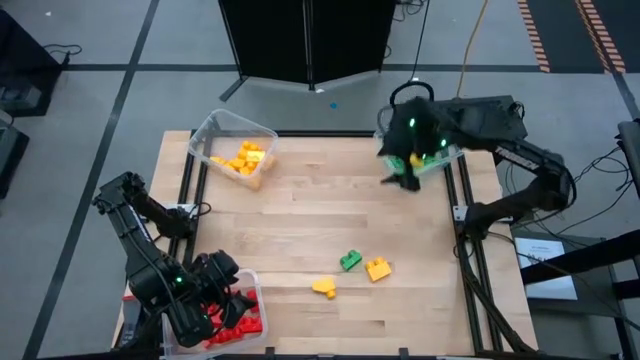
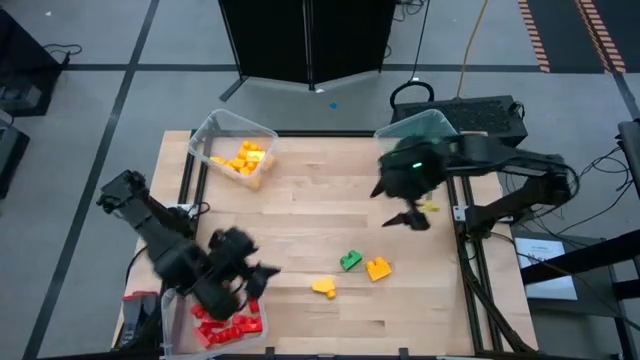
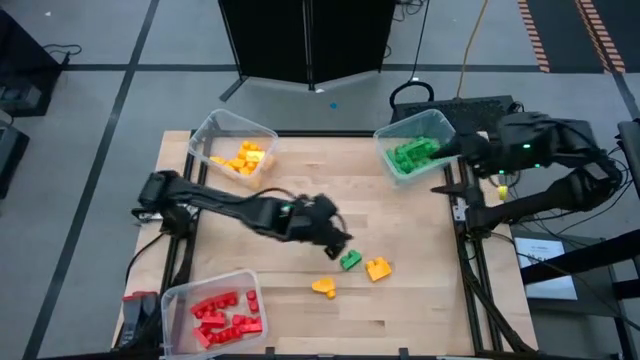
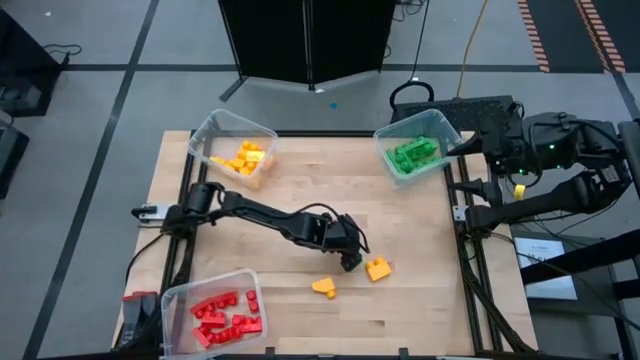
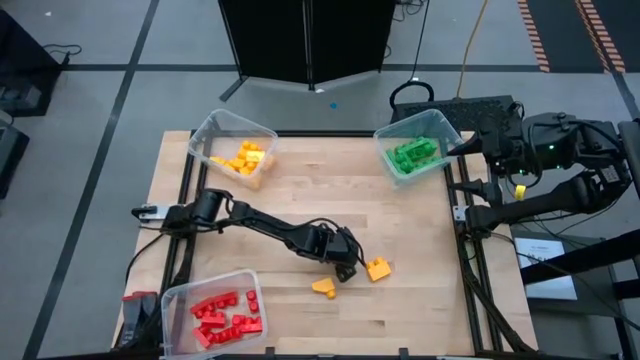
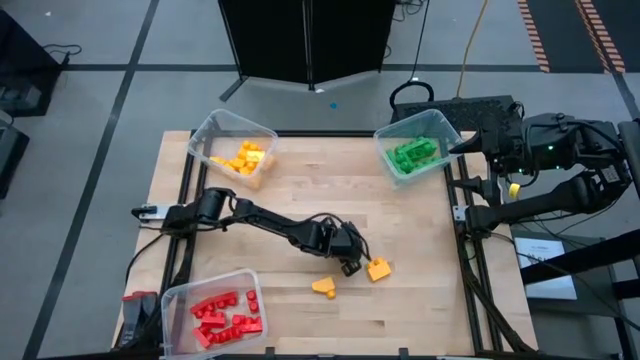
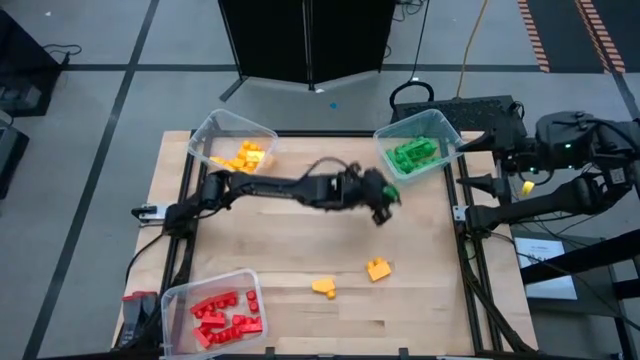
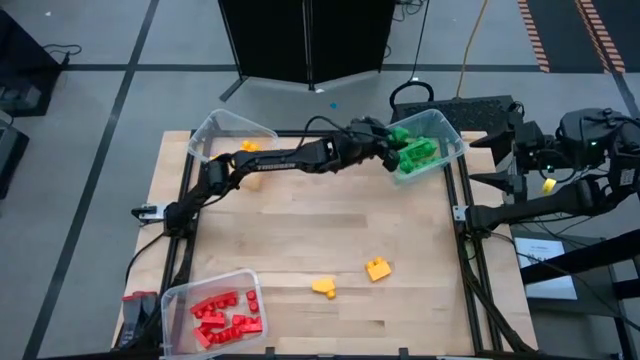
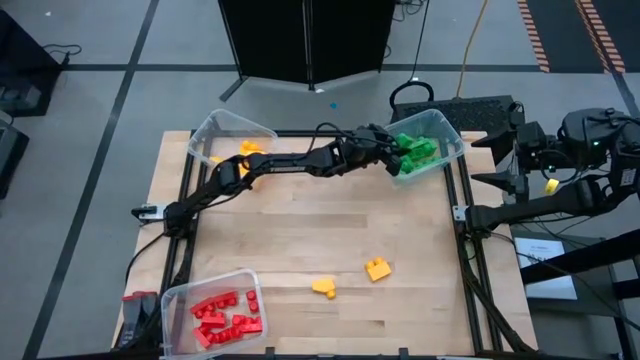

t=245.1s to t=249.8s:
Task: Sort blocks
Put the green game piece into the top right transparent bin

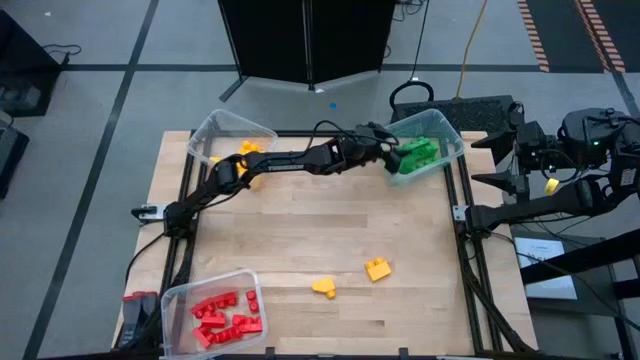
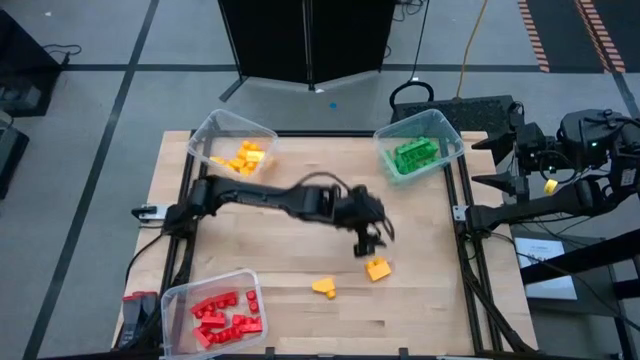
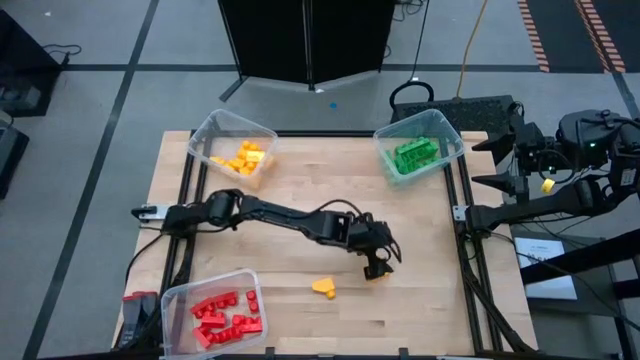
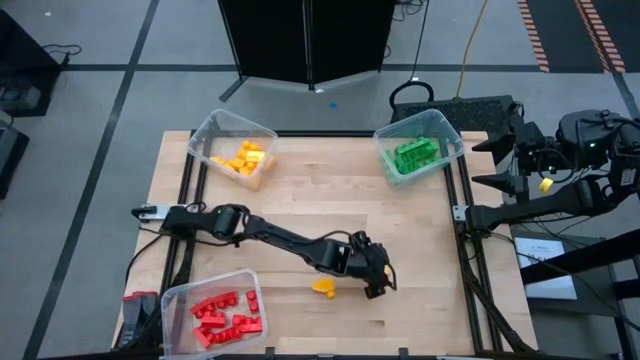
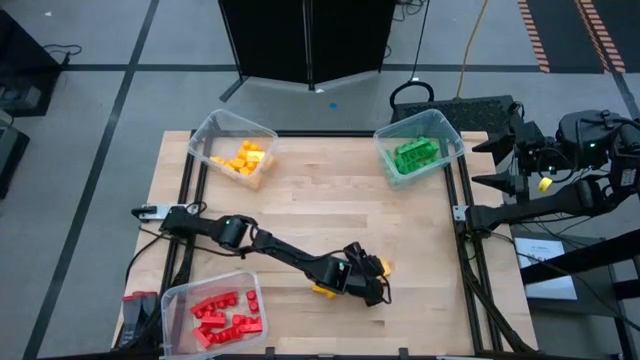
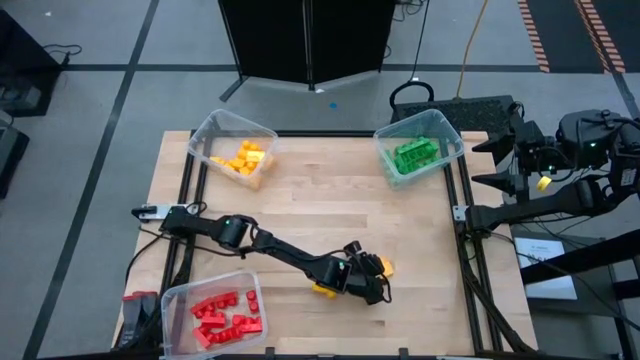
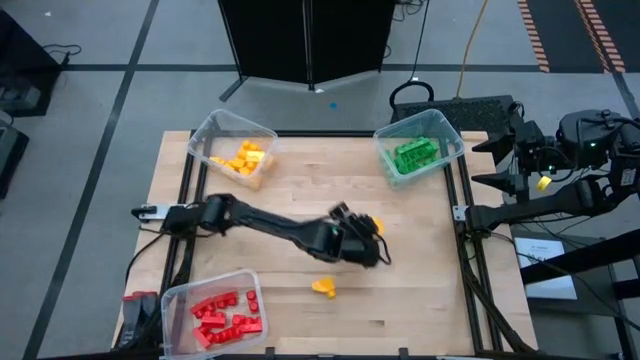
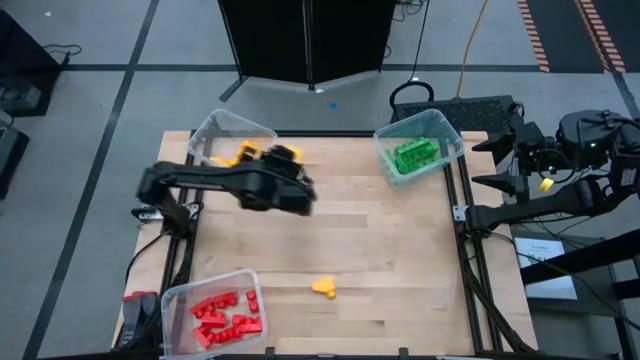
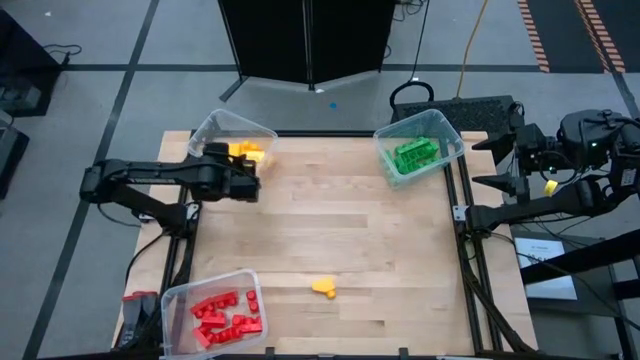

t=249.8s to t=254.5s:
Put the yellow game piece into the top left transparent bin

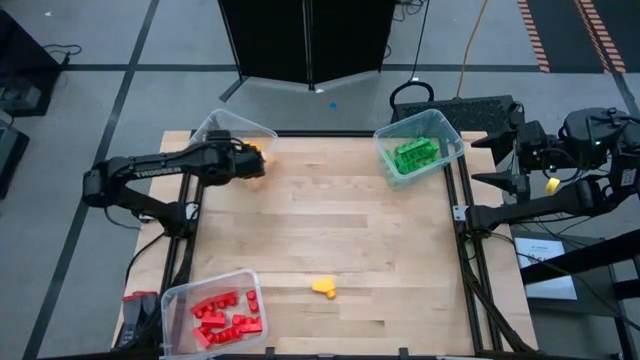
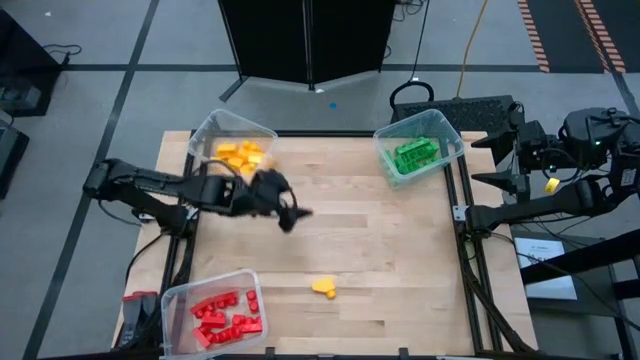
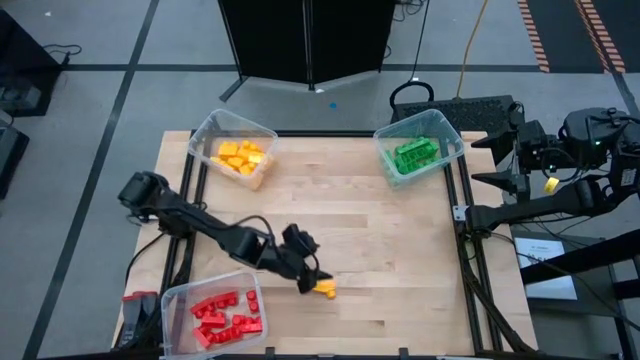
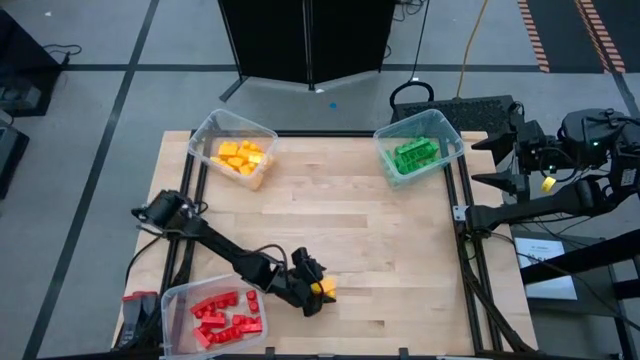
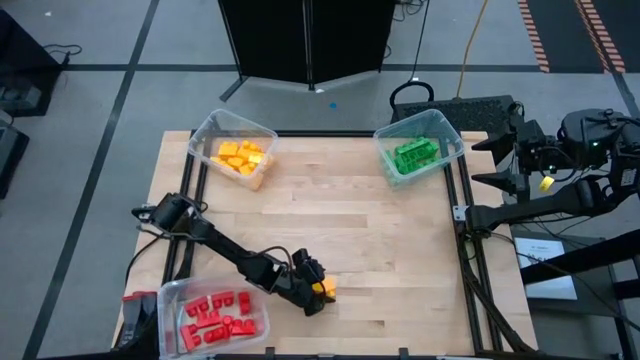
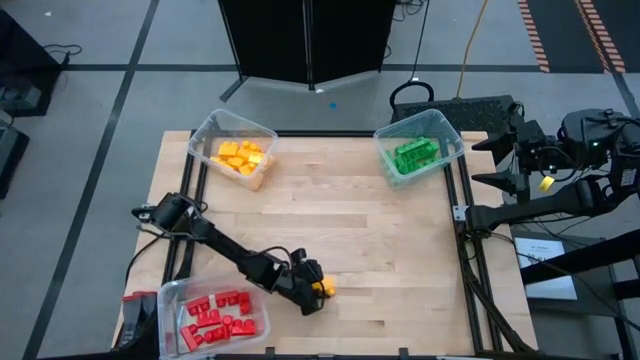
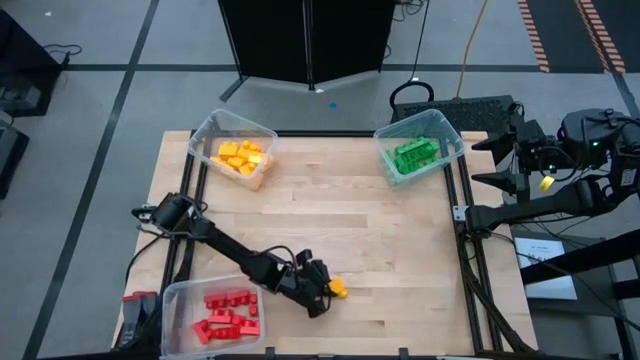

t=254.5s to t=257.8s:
Put the yellow game piece into the top left transparent bin

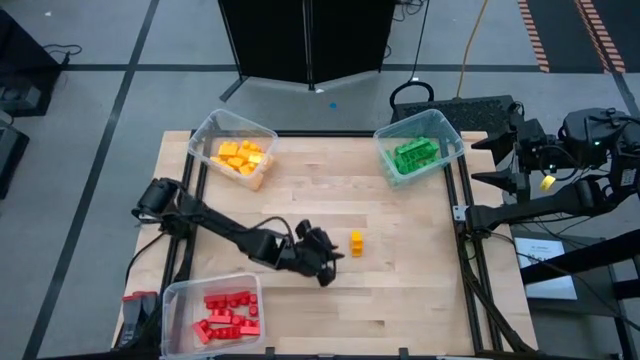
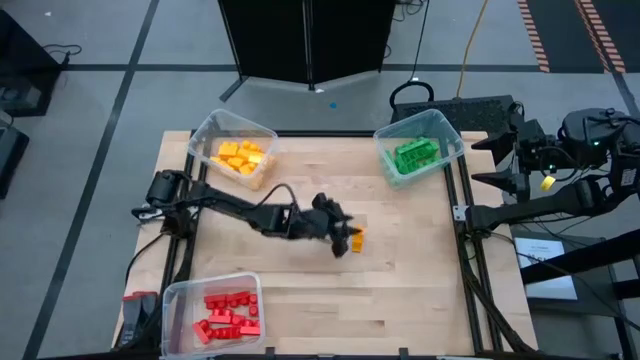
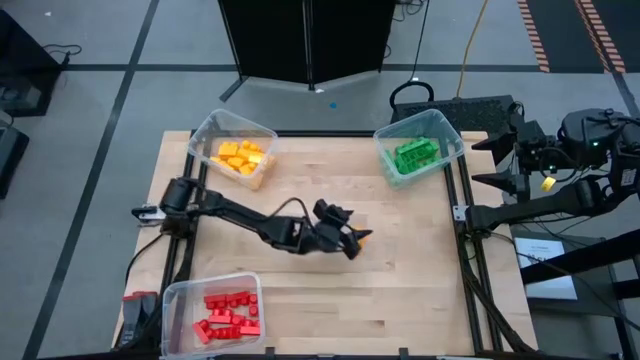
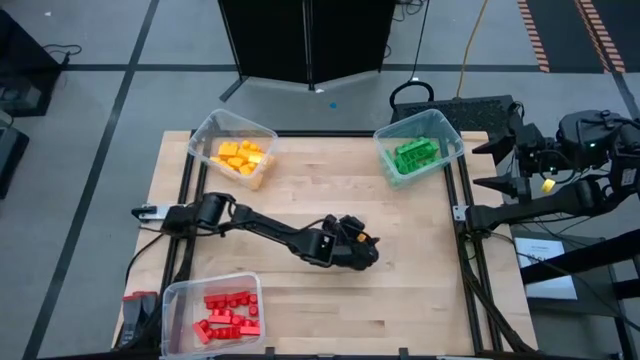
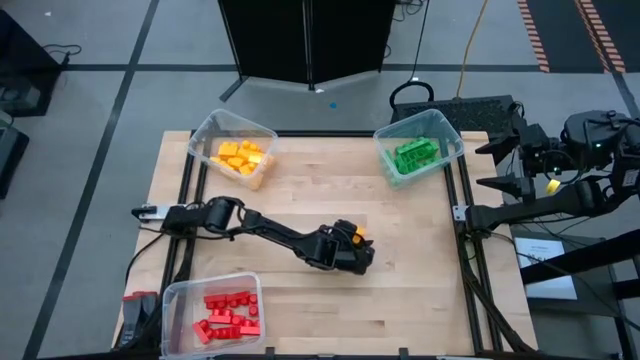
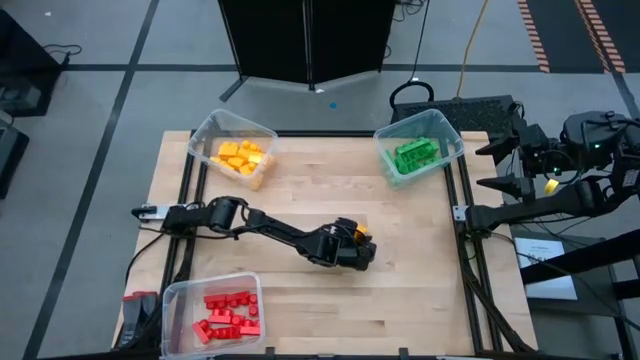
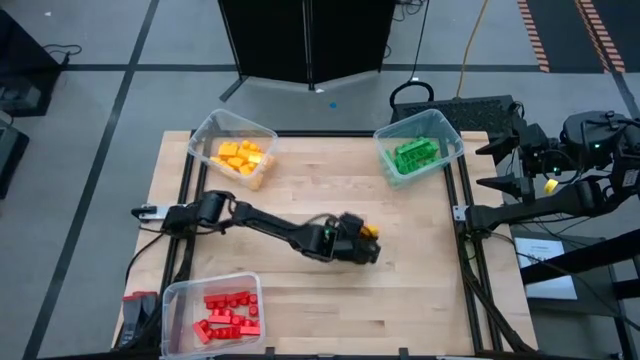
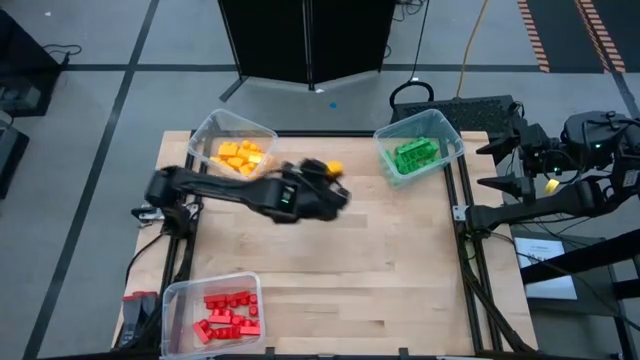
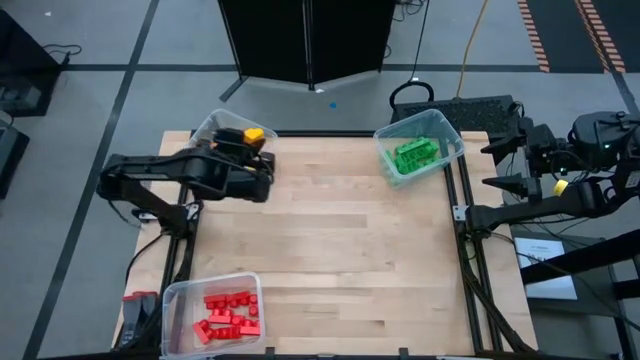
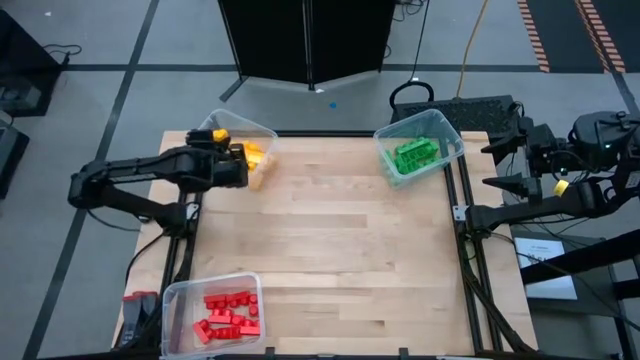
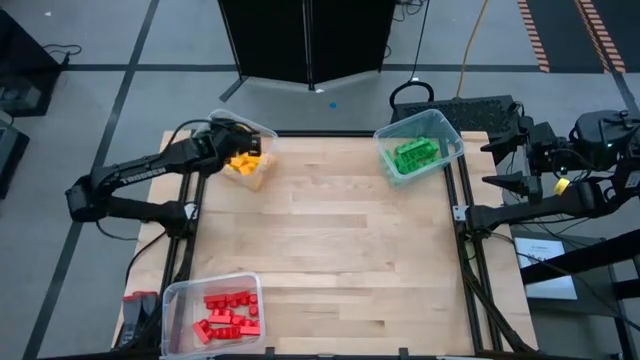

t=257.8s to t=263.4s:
Put the yellow game piece into the top left transparent bin

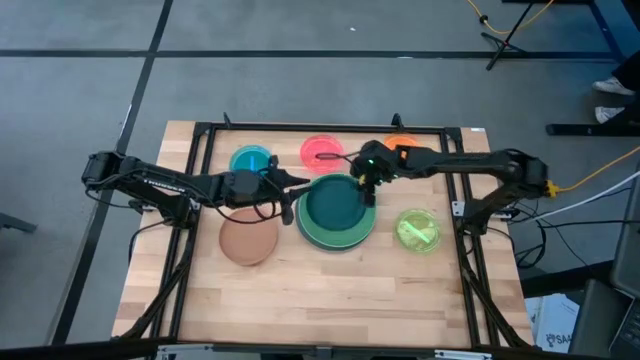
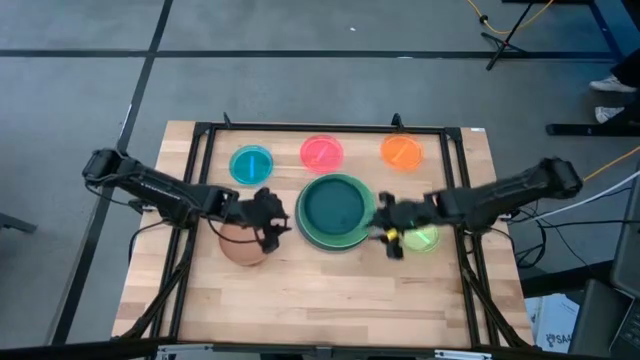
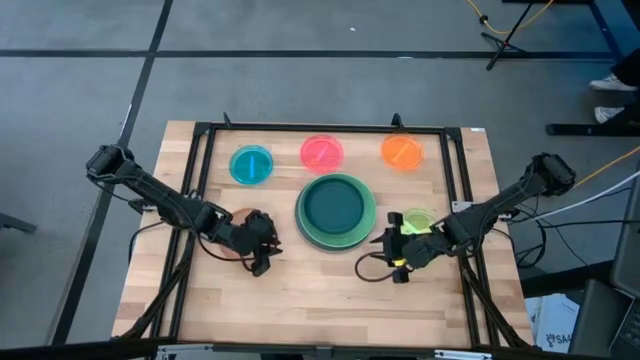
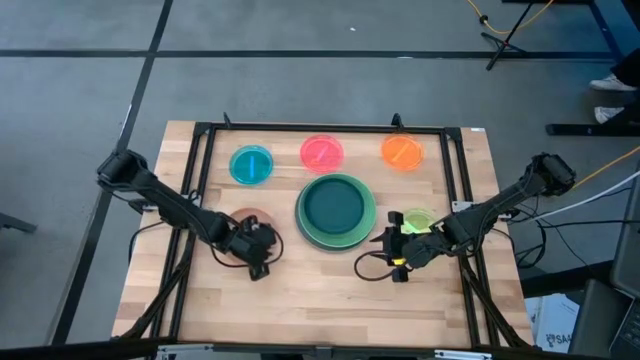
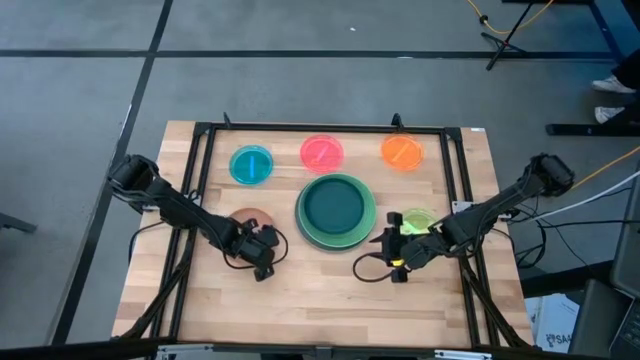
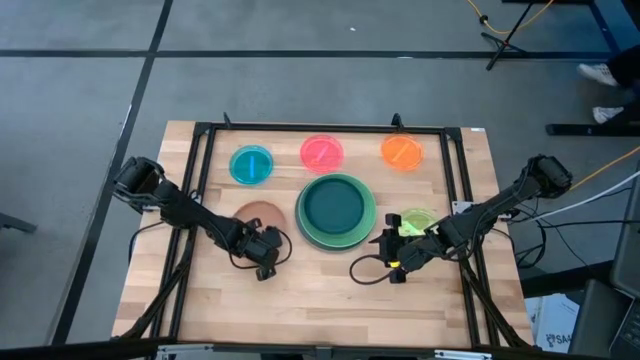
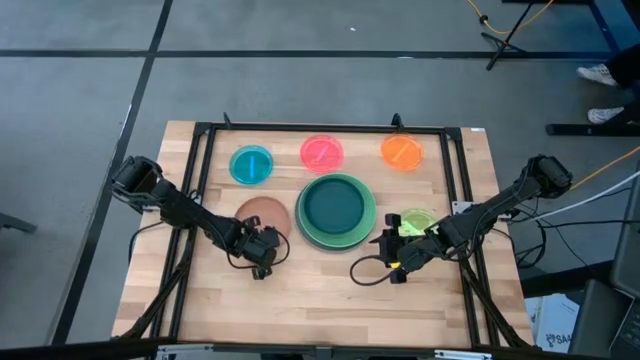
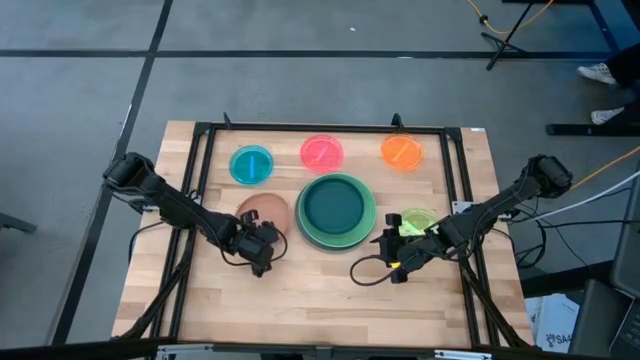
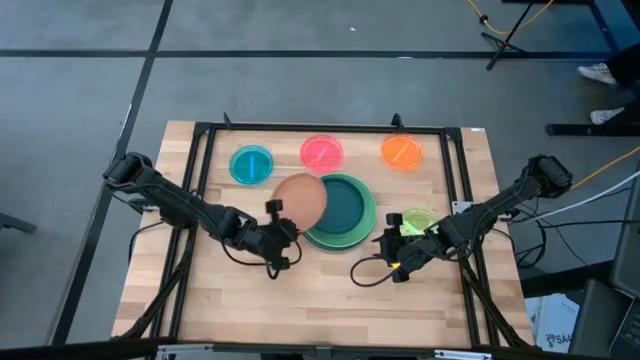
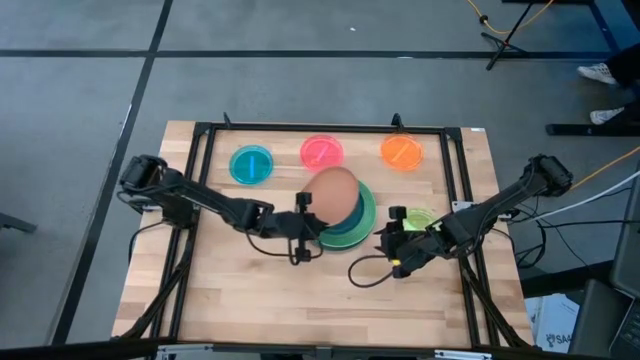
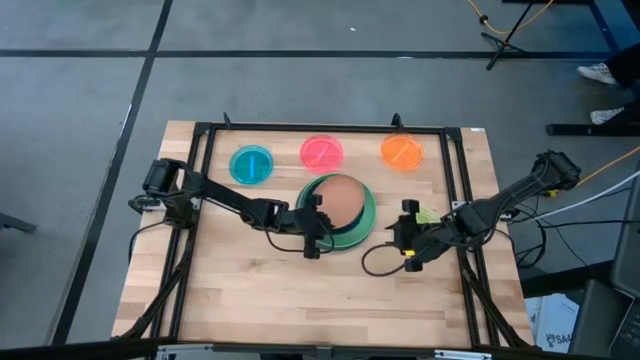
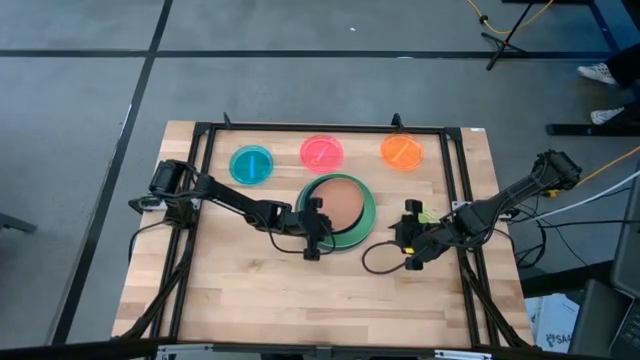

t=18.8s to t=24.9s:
Task: Stack plastic plates
Stack the brown plate on top of the dark green plate
